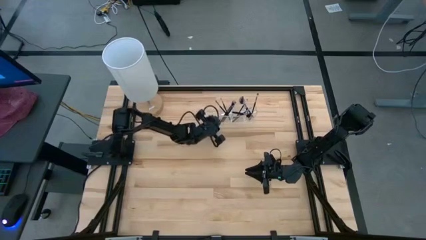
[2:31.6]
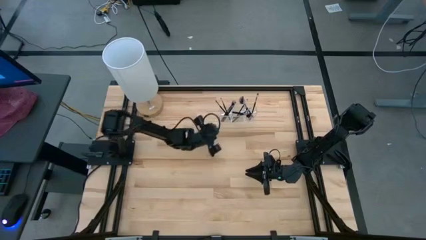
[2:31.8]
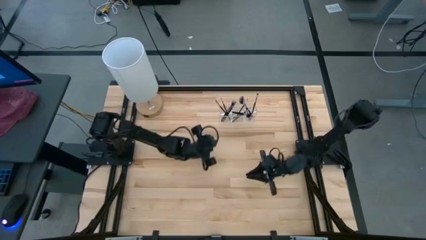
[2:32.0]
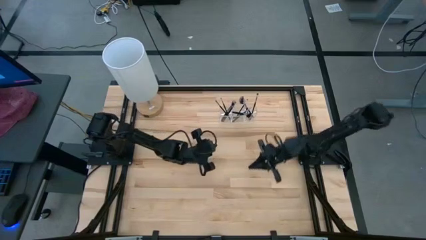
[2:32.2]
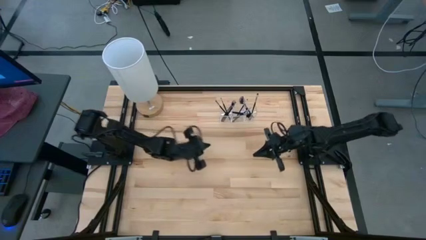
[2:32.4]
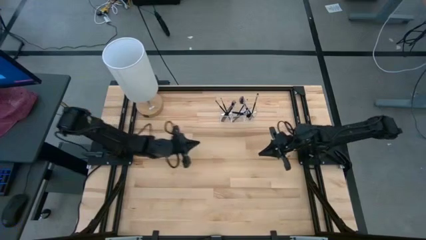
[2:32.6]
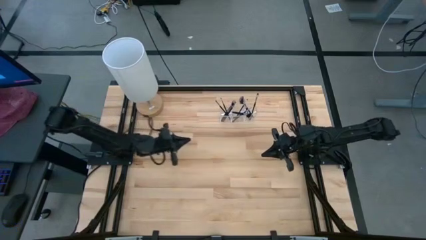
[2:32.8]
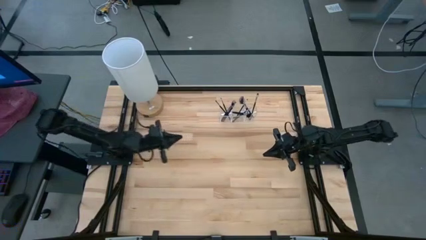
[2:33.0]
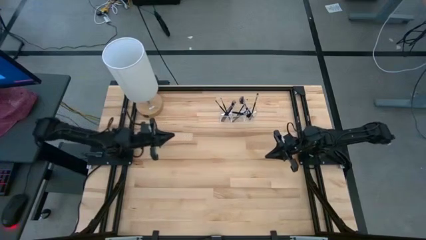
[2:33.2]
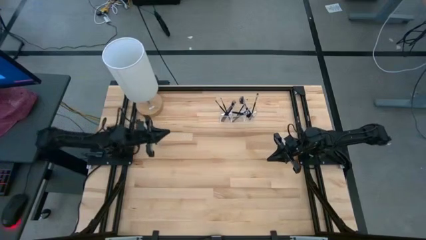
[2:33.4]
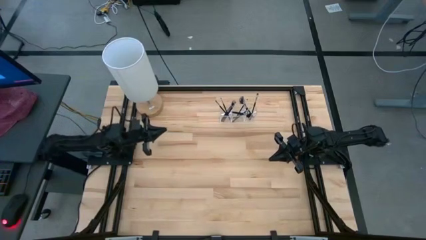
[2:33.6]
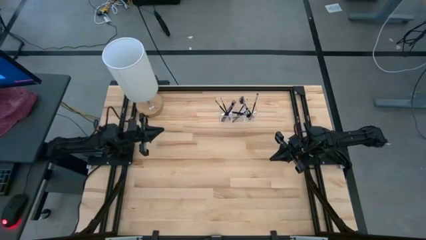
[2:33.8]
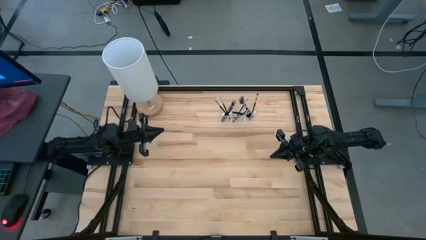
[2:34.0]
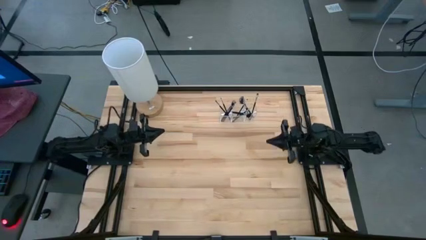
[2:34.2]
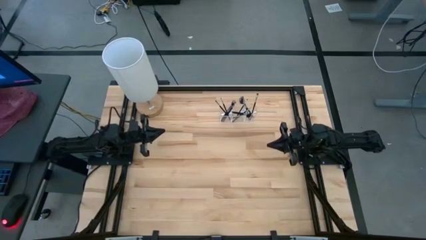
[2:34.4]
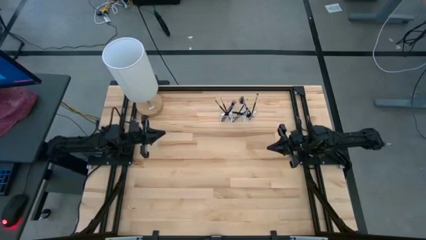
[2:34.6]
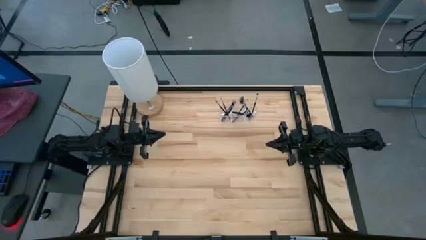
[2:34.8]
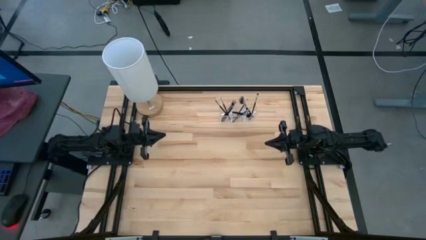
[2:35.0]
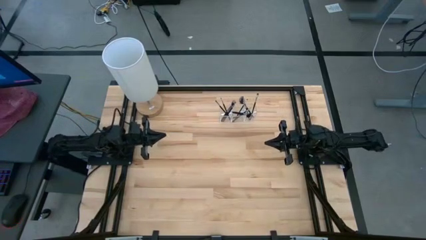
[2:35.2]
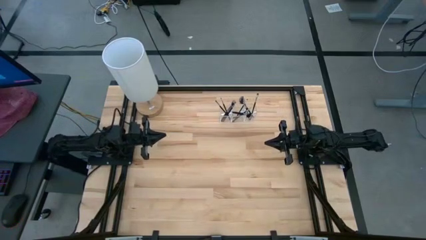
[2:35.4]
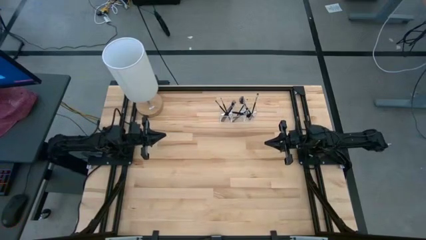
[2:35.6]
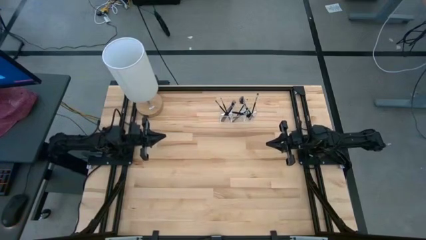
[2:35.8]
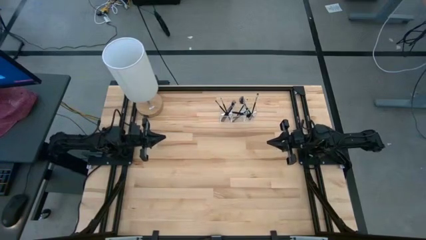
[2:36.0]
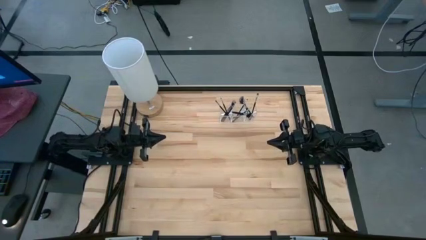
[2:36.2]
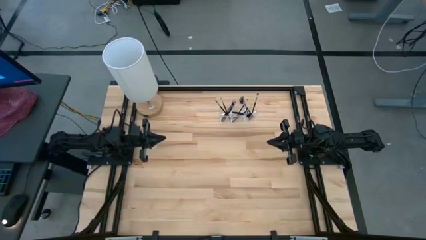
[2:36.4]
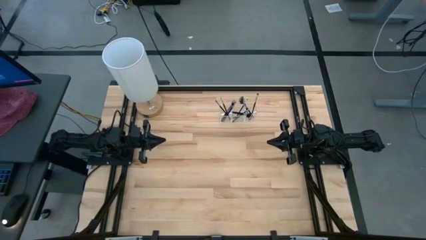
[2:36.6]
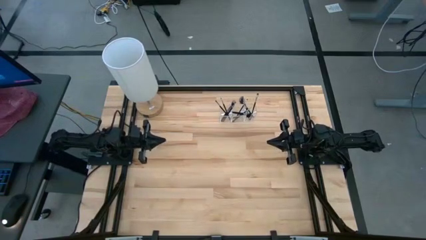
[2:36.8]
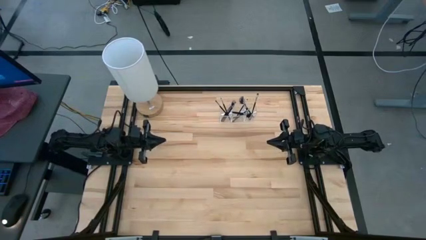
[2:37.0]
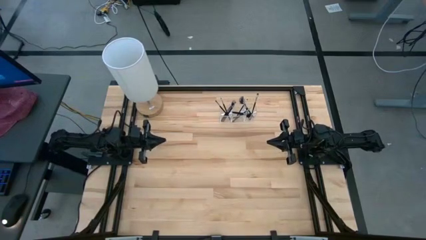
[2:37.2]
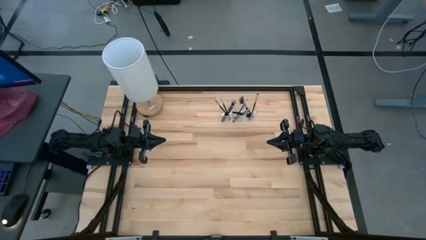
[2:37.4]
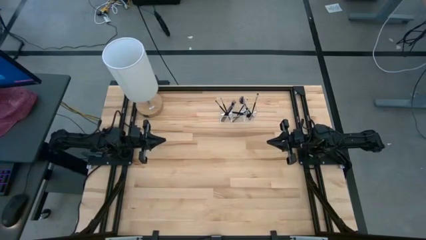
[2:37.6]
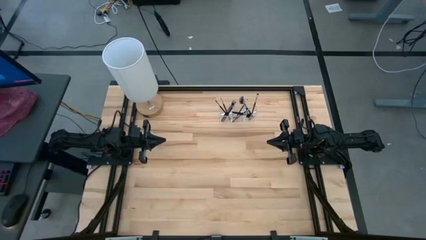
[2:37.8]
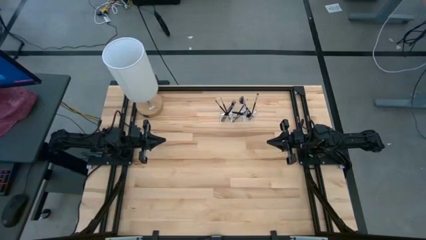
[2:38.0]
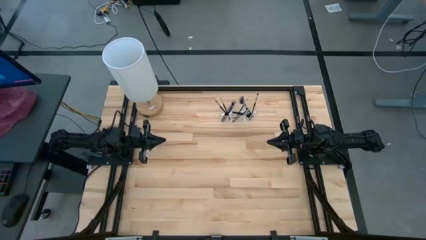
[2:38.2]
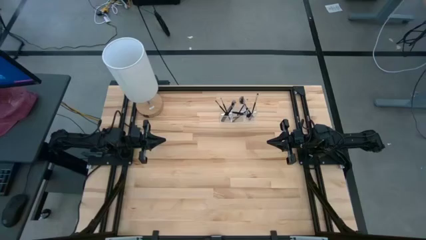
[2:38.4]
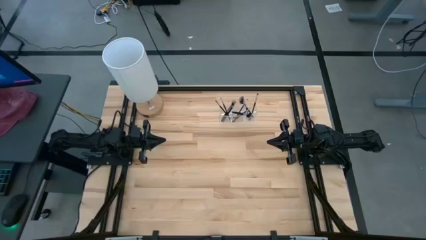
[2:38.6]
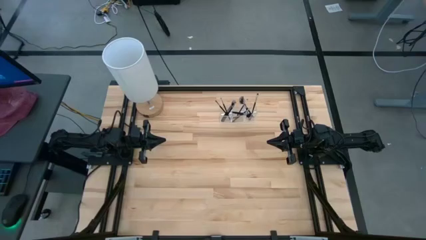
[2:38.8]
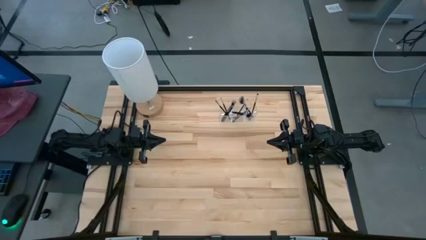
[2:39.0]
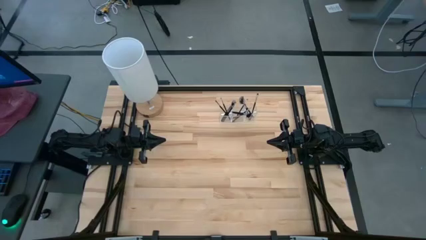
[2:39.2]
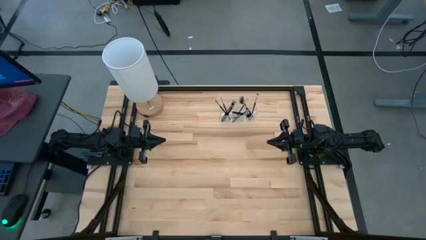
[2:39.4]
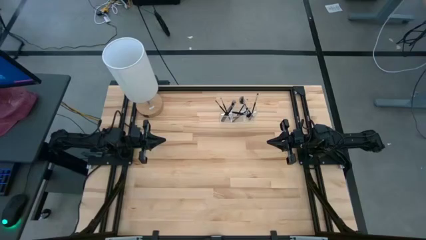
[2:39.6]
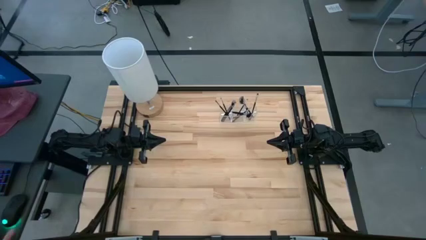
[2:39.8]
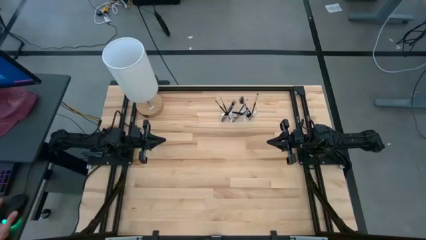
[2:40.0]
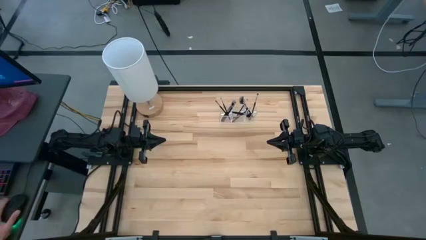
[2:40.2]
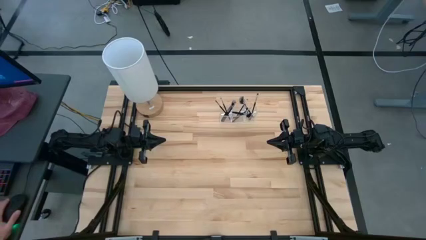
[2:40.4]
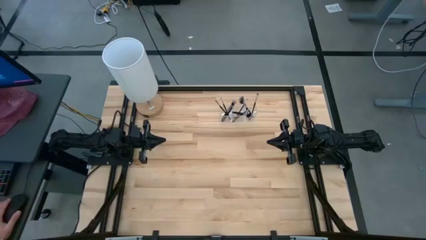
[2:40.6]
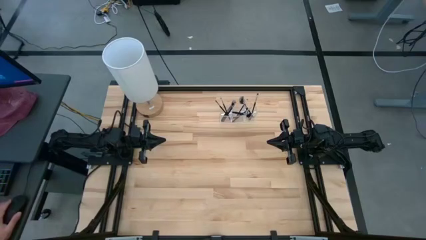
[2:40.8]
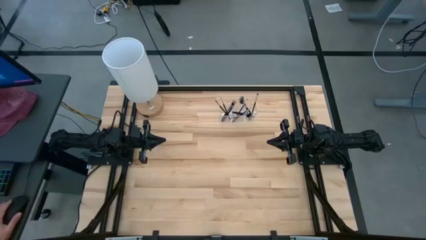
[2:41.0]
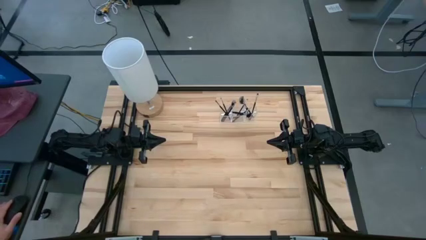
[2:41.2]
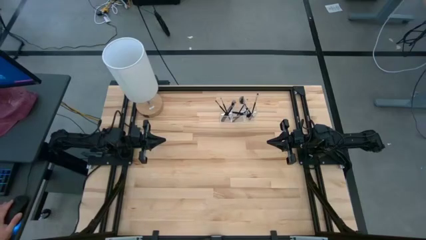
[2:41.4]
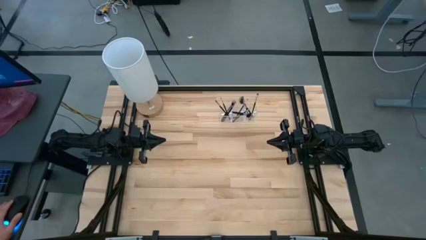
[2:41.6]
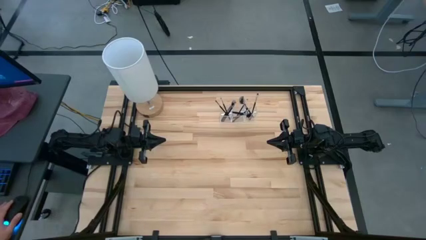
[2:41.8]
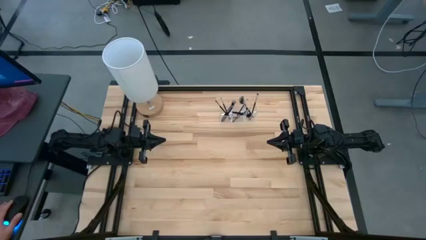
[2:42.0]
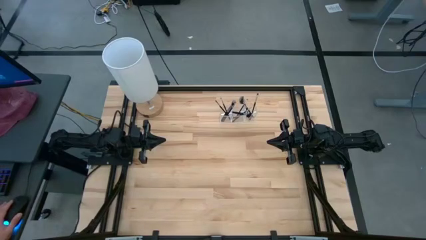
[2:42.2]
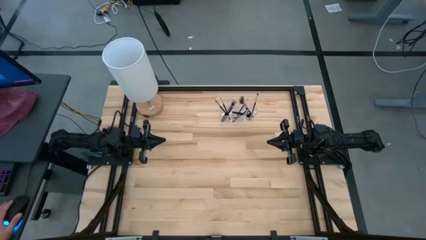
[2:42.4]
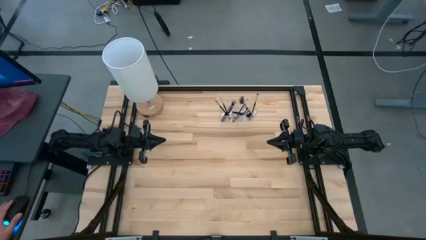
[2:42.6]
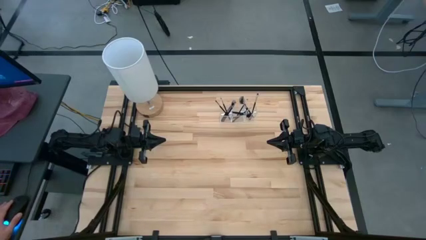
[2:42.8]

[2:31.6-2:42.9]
Task: Put items in baskets/containers
Return to Home Position
